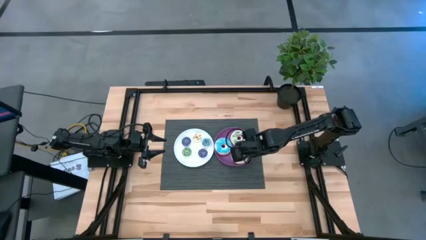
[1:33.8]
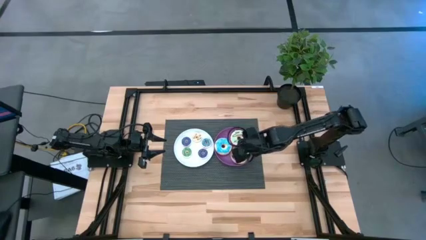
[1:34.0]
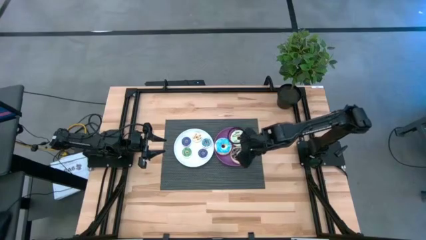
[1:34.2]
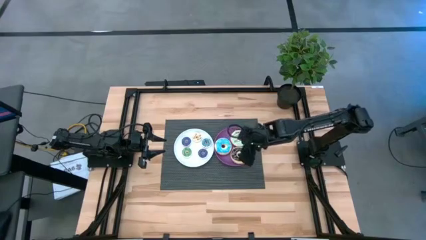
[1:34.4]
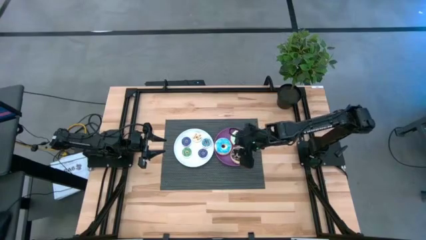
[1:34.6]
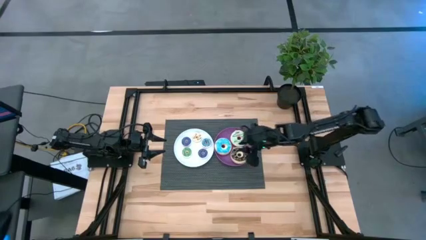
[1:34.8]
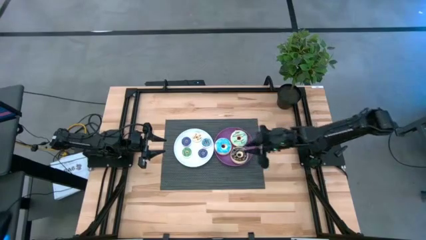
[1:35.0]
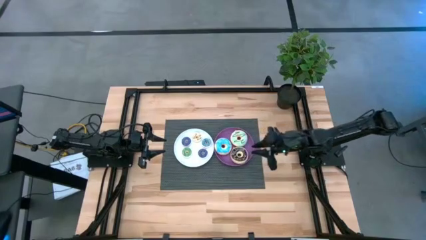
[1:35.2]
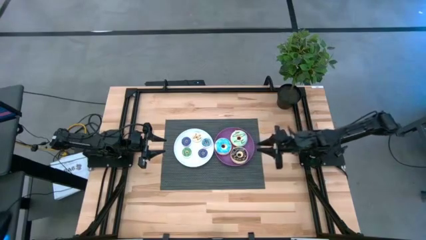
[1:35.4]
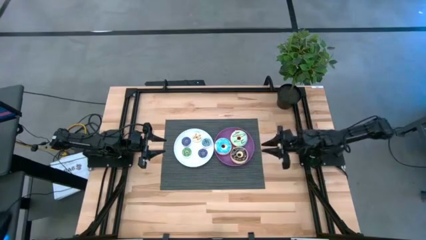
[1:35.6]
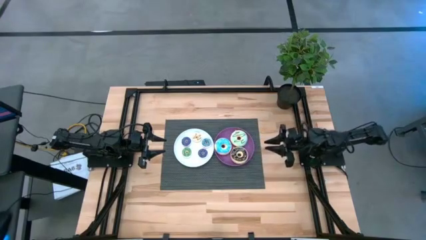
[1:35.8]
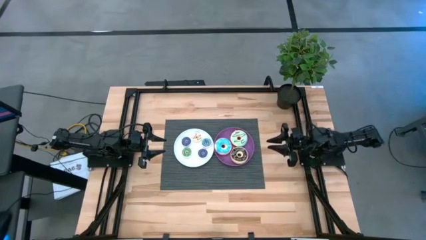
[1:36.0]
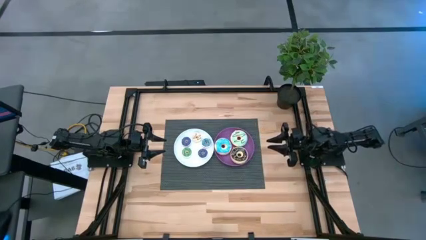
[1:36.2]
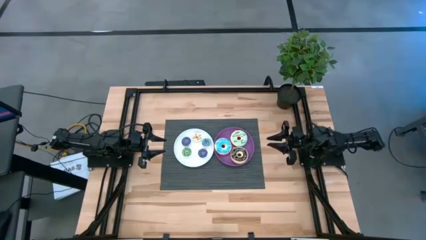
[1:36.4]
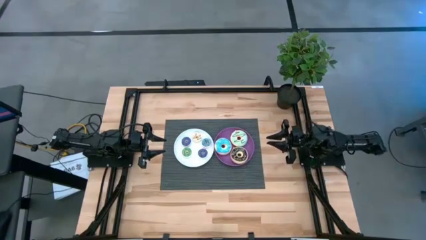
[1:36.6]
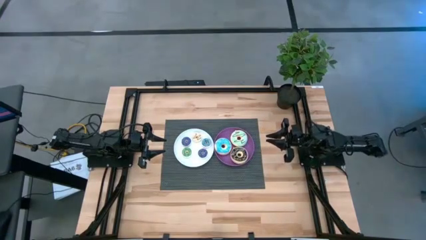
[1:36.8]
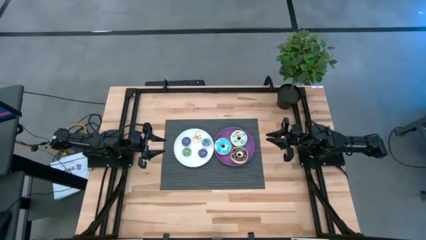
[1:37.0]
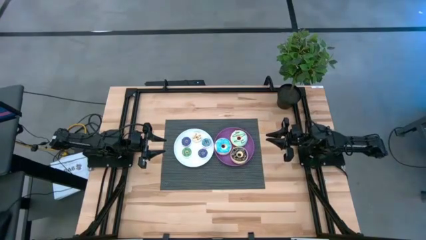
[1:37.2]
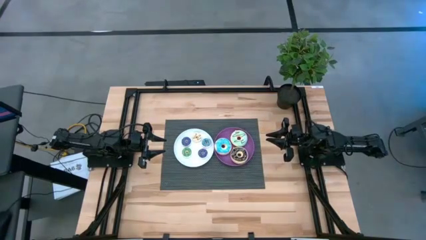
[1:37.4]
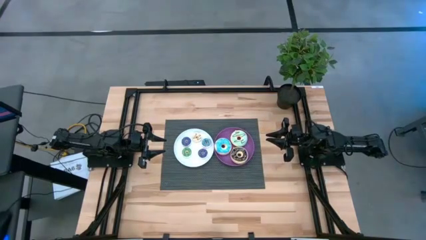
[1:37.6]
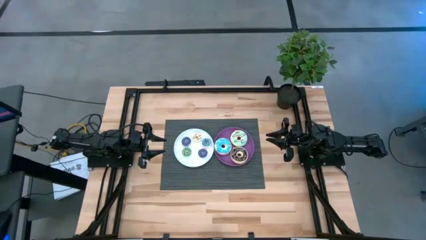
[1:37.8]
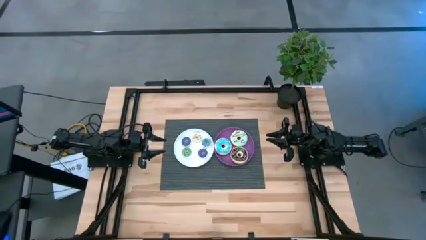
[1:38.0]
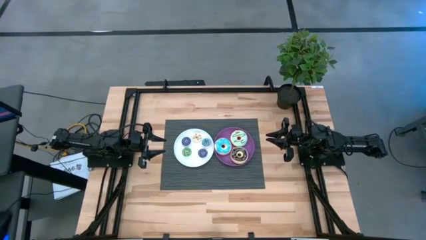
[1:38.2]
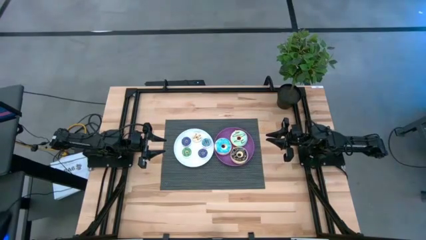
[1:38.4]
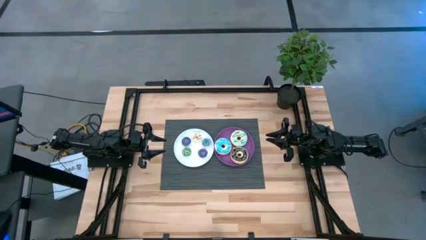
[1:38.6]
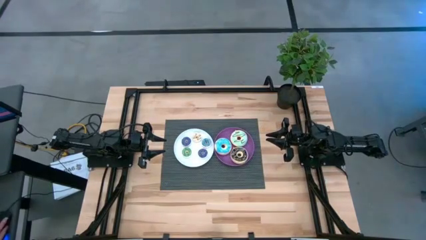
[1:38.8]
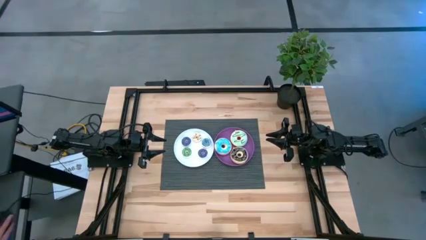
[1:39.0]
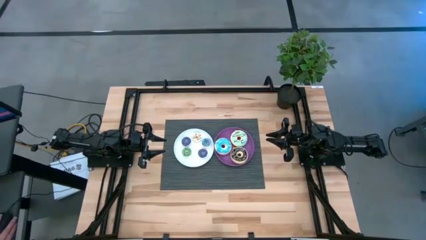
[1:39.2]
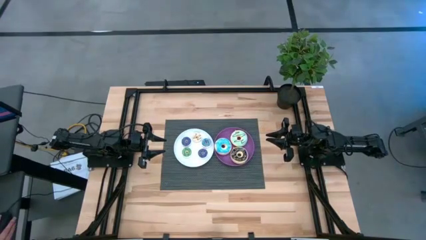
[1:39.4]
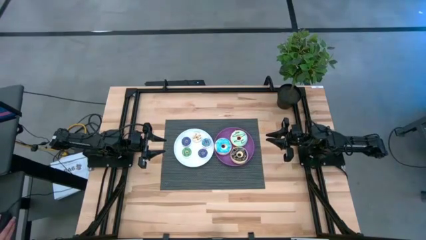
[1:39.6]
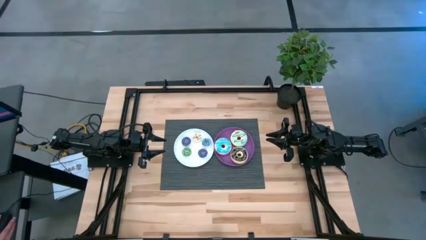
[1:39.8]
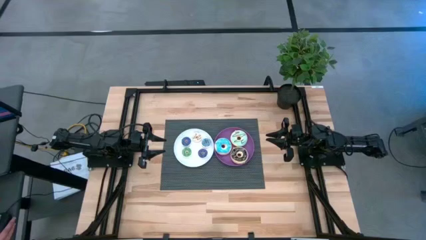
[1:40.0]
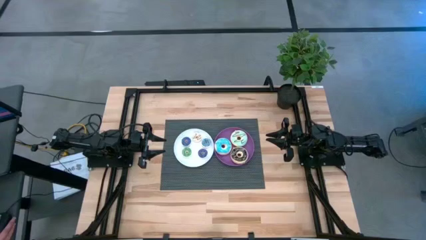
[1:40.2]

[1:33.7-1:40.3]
Task: Pick & Place donuts
Return to Home Position

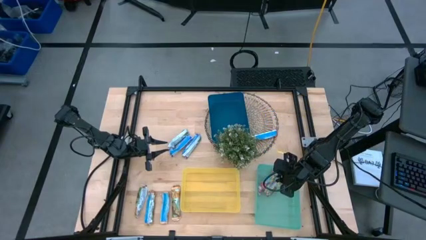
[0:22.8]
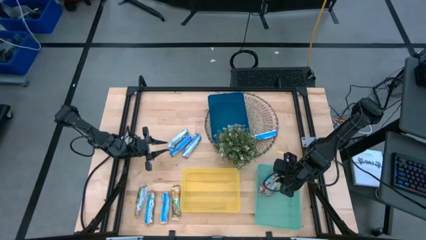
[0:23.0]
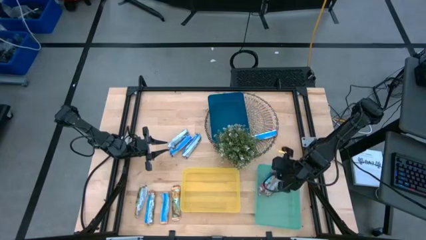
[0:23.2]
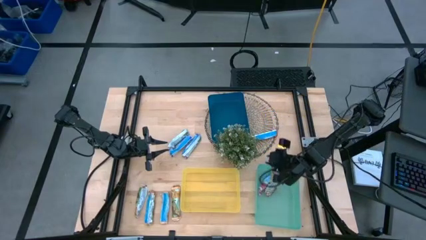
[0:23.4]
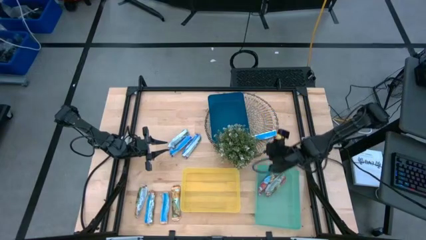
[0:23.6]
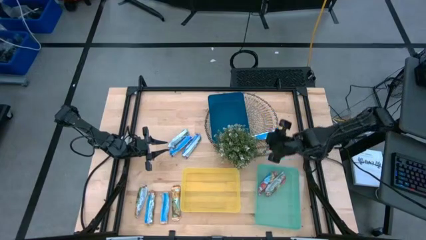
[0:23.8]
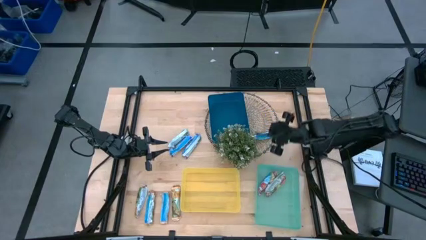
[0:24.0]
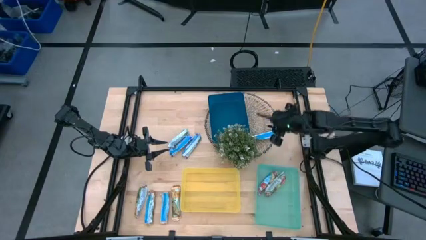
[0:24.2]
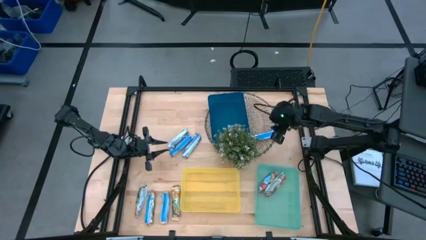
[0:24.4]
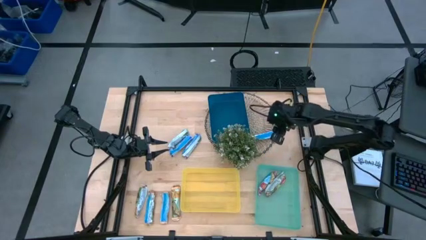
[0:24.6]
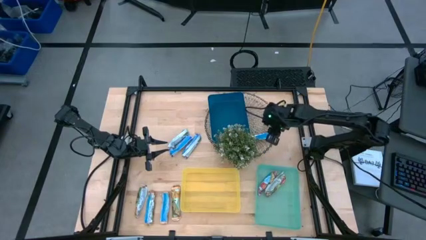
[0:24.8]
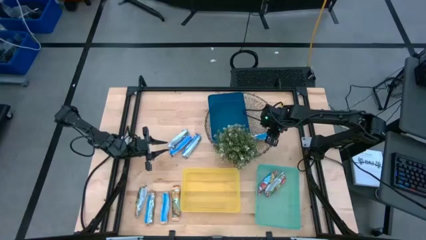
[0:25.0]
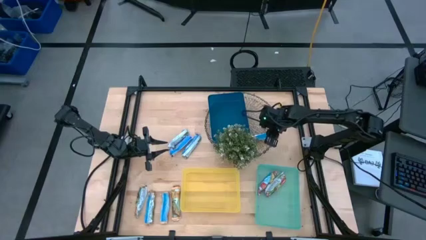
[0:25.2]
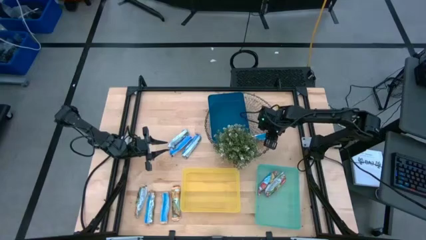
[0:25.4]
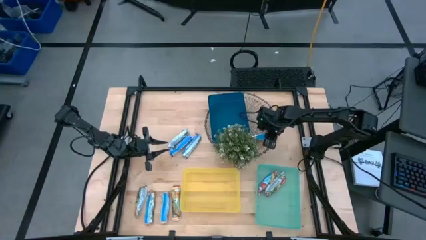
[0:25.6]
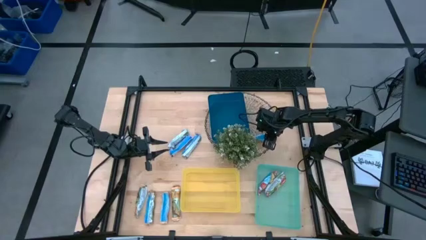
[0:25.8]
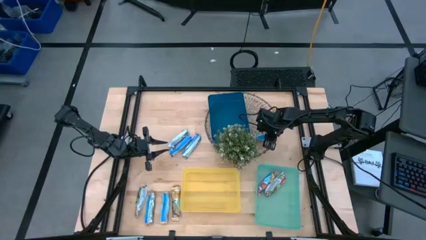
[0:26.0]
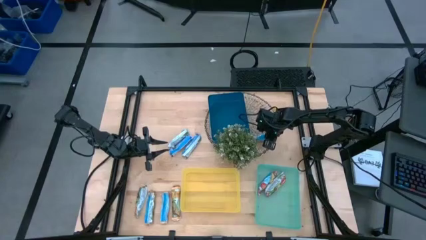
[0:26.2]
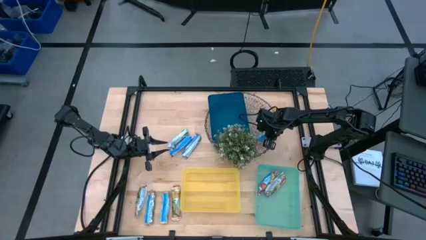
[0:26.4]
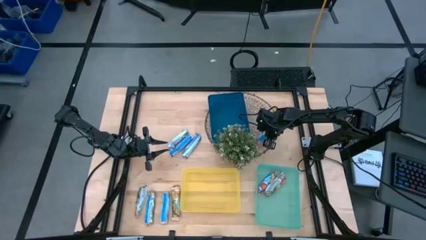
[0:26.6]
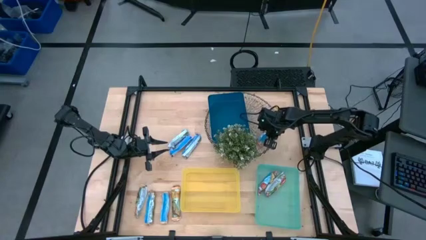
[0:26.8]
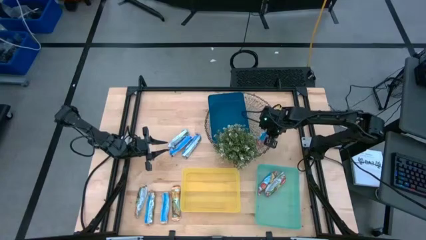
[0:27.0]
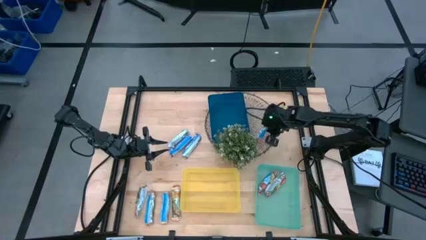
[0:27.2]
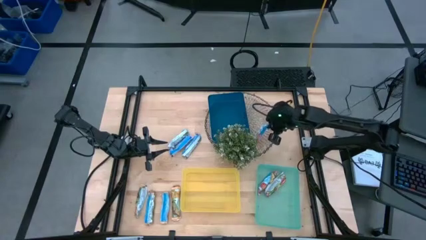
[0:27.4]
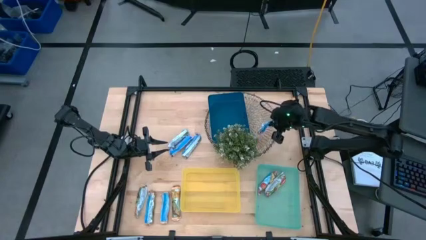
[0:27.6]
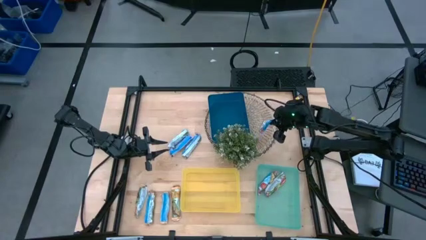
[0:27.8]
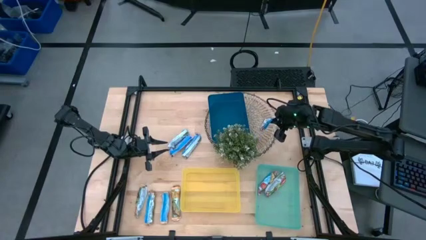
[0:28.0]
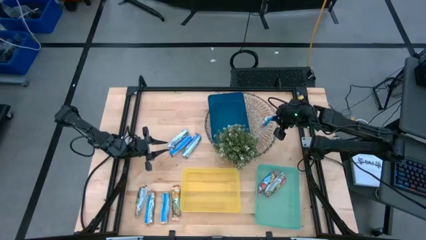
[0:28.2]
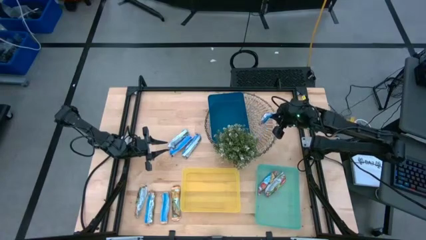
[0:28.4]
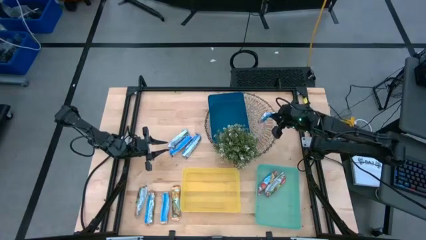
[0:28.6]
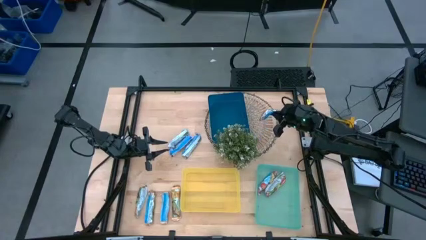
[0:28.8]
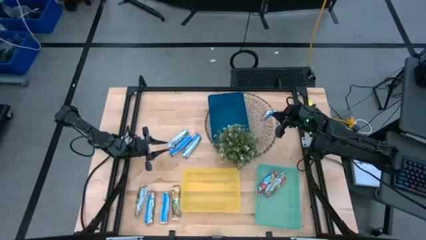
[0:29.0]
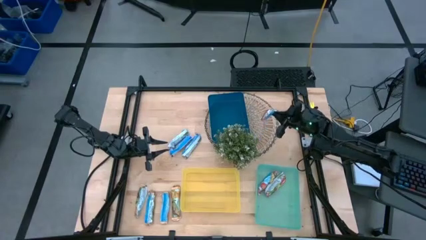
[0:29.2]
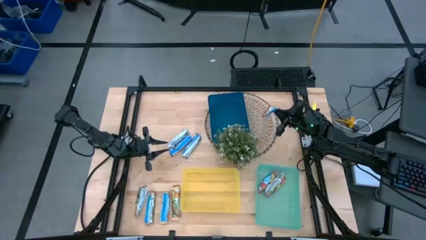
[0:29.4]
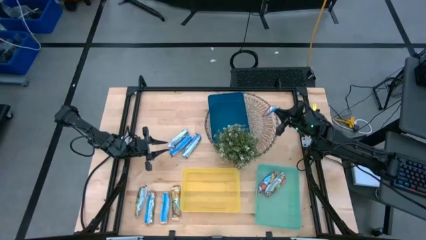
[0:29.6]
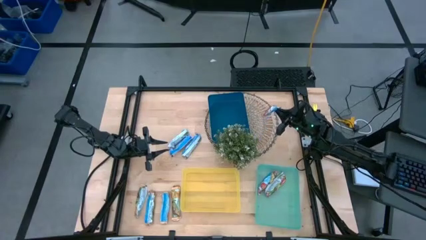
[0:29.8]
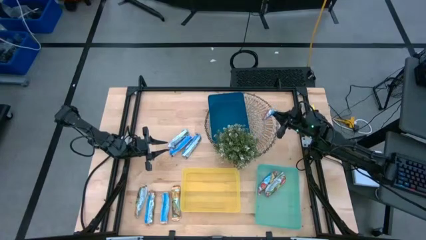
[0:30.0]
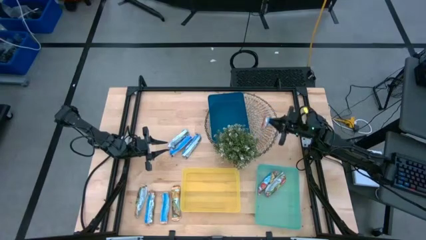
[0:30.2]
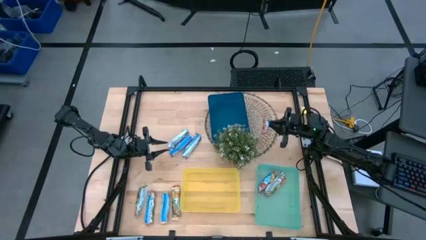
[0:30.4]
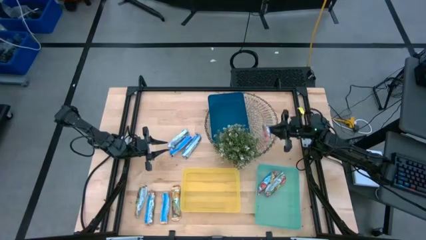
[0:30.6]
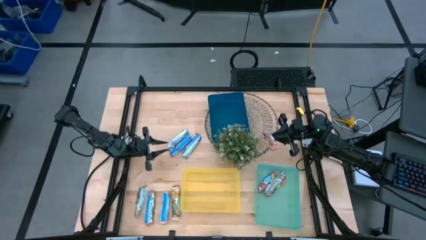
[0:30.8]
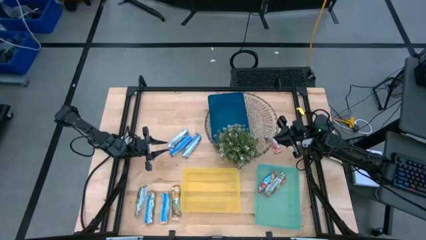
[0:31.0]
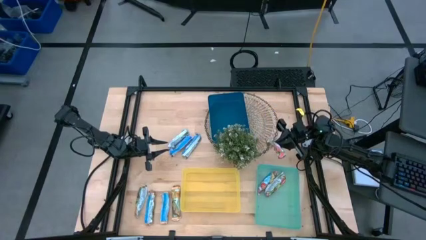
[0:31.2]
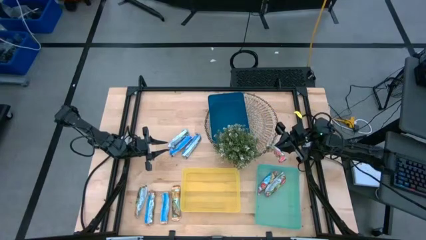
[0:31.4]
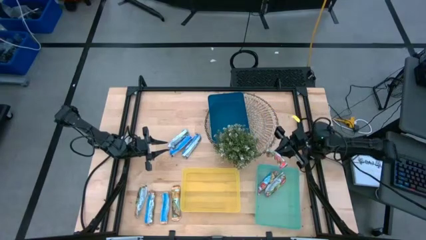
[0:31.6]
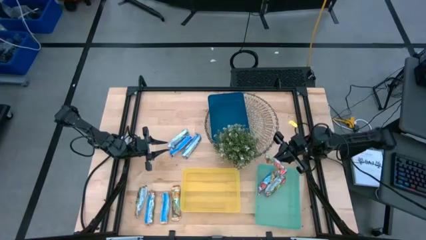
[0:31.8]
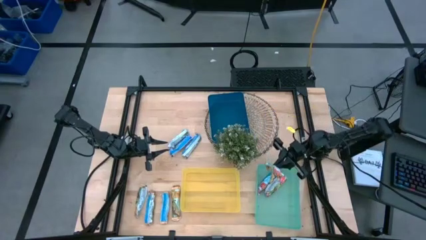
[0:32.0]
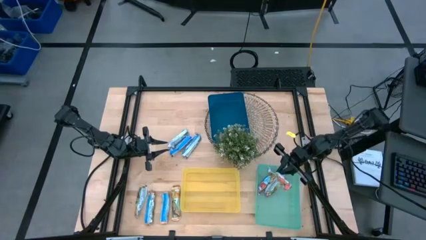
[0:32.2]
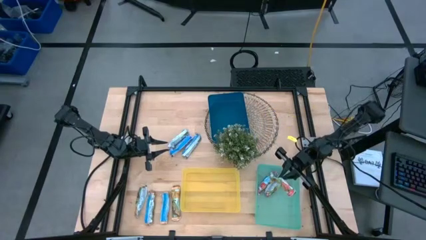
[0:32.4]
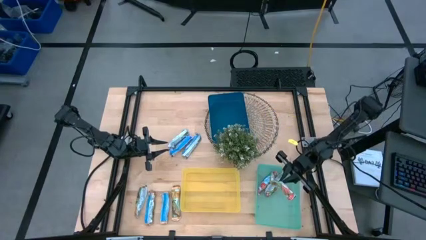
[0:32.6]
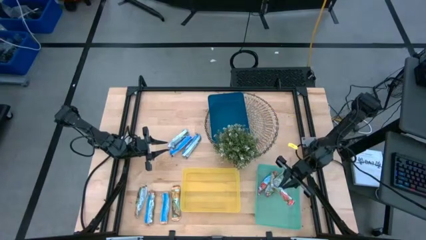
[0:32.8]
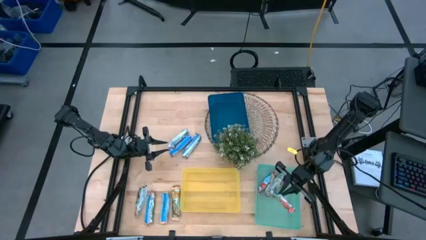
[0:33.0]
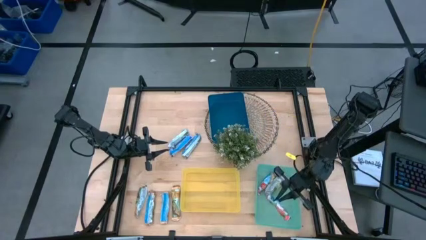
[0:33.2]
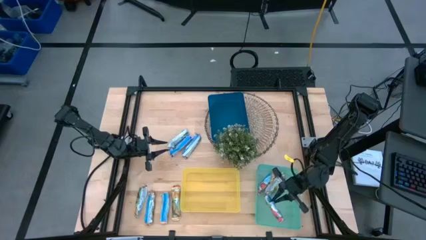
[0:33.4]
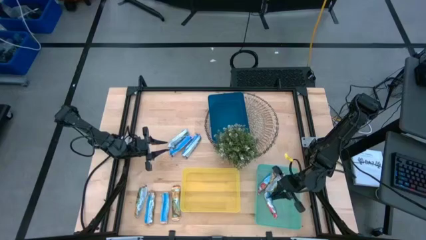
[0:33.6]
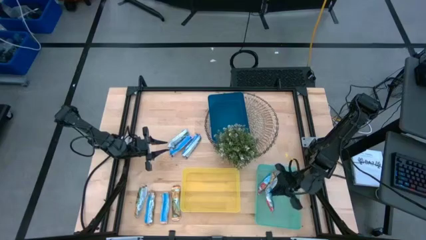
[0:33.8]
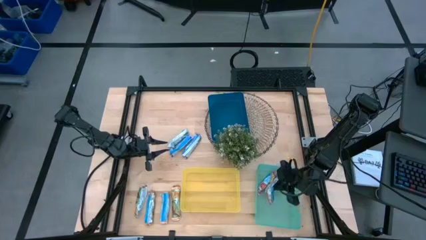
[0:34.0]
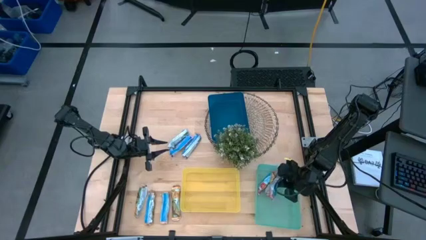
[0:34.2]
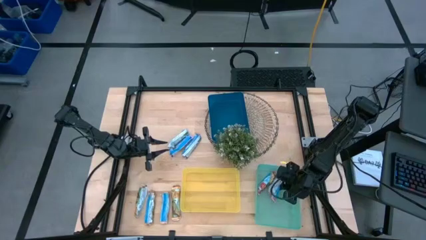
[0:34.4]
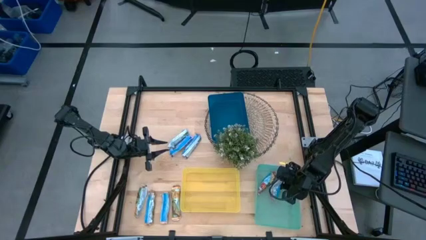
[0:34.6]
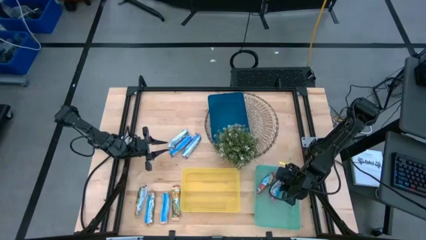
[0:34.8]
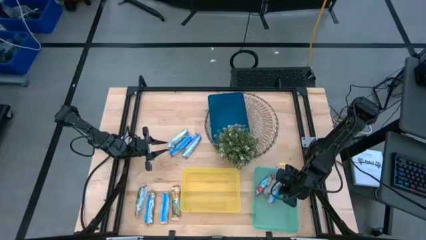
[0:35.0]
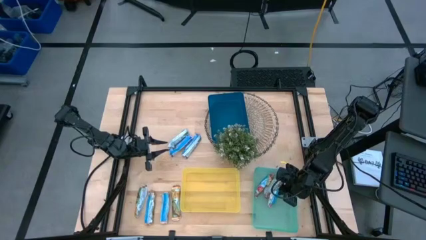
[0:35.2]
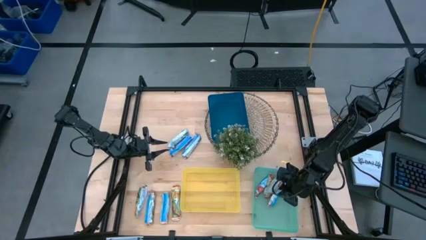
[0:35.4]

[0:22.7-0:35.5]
Task: Pick and place Granola Bars by type
Put the green granola bar into the light green bin
